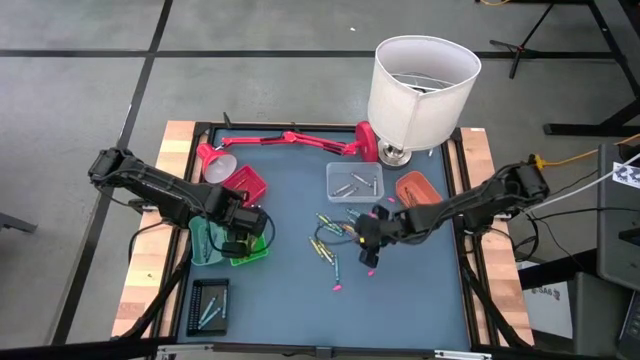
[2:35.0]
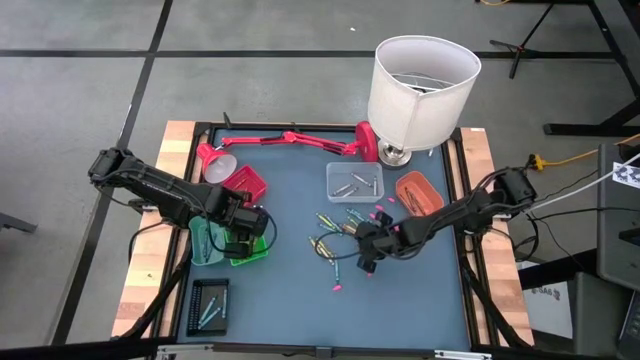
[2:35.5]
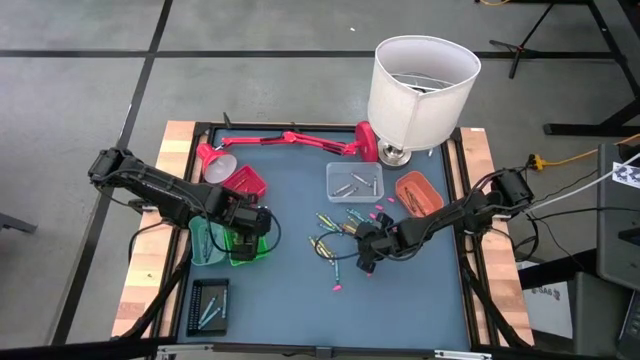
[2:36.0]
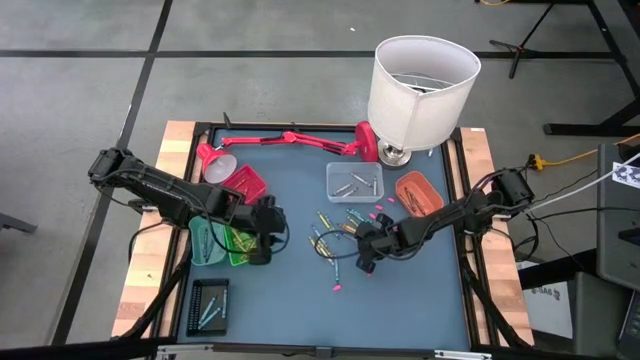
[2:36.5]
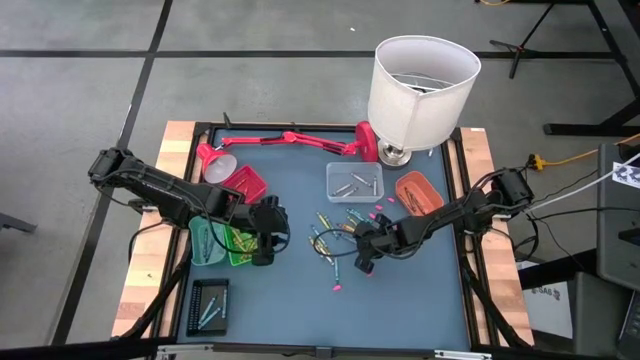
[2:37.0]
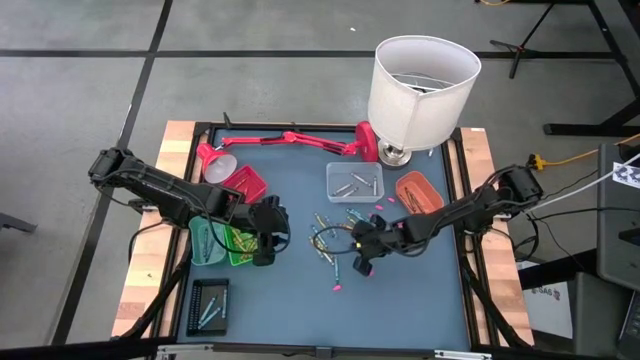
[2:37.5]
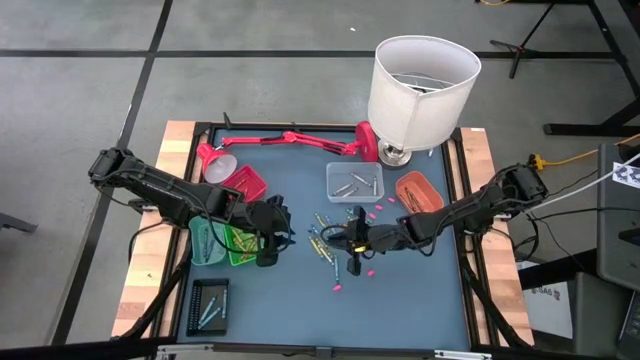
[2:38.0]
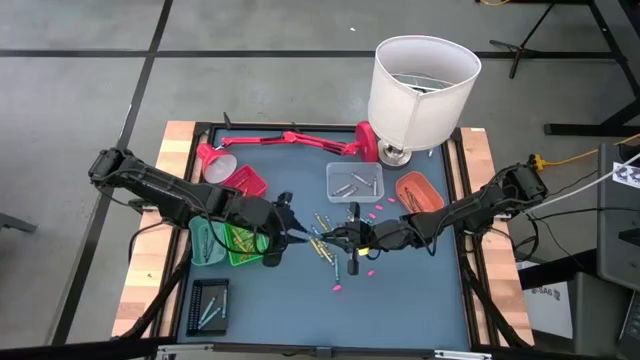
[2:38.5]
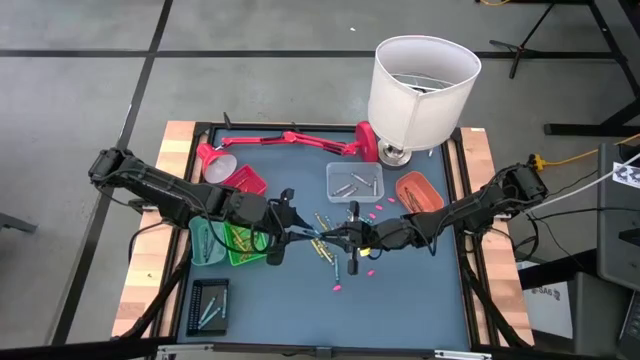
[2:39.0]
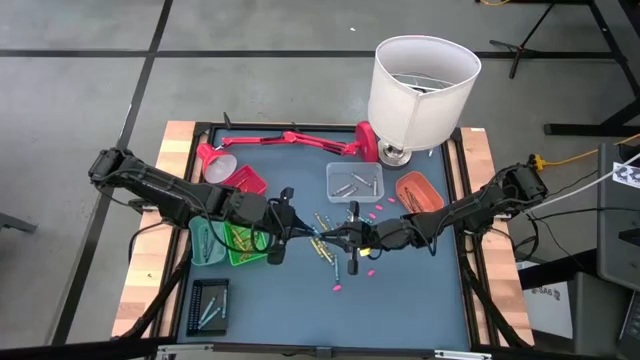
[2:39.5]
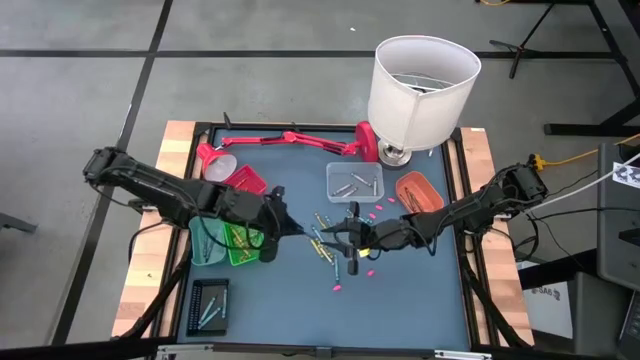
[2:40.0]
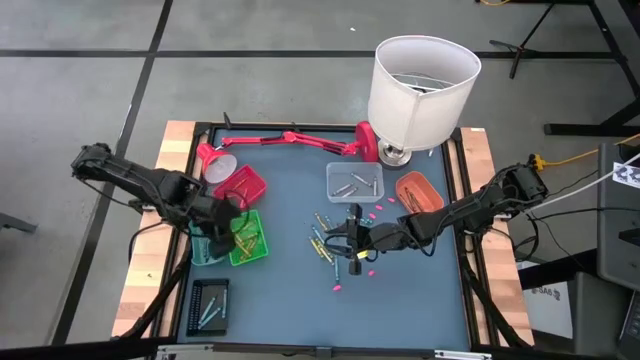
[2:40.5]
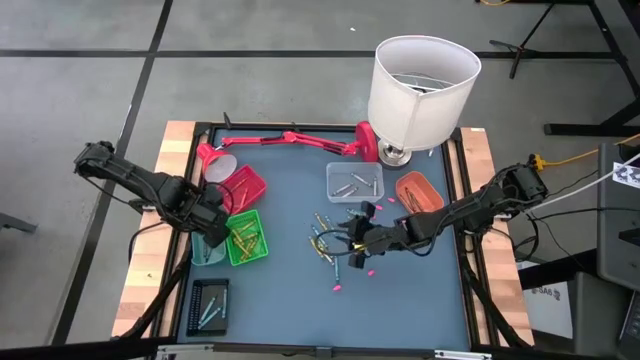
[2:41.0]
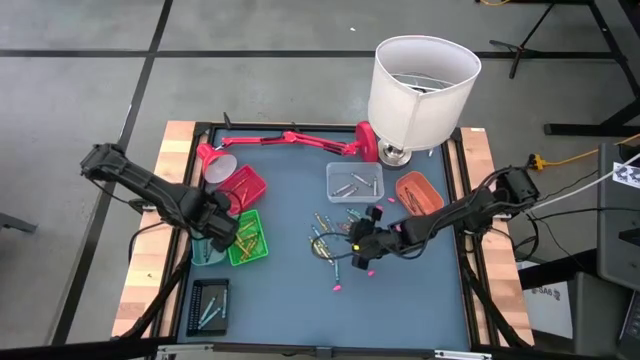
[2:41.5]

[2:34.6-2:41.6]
Task: Sort crayons
Put the blue crayon into the blue bin

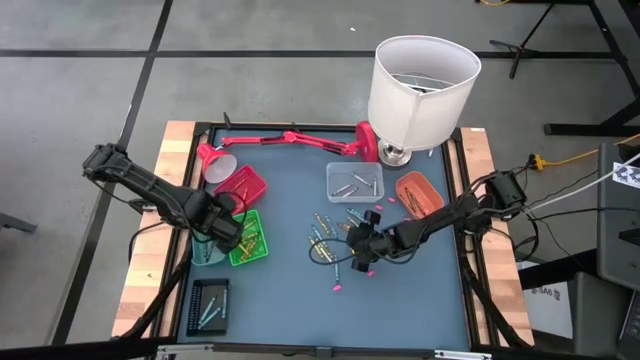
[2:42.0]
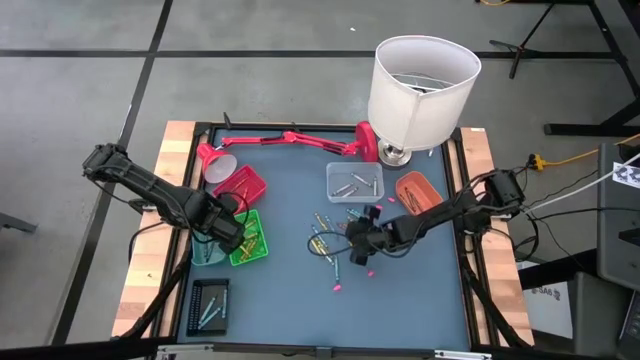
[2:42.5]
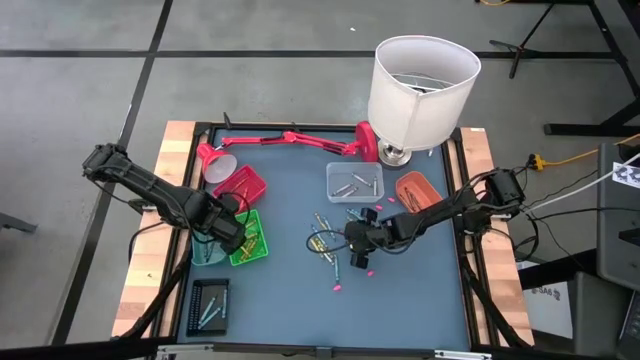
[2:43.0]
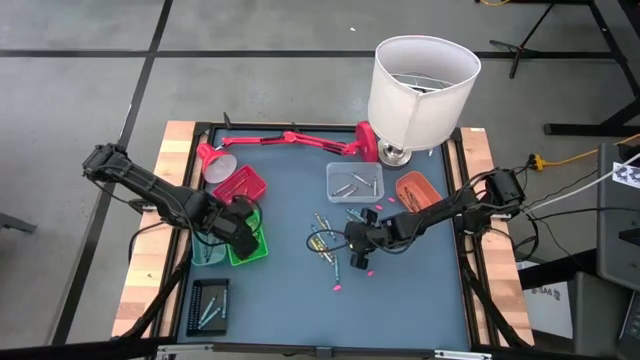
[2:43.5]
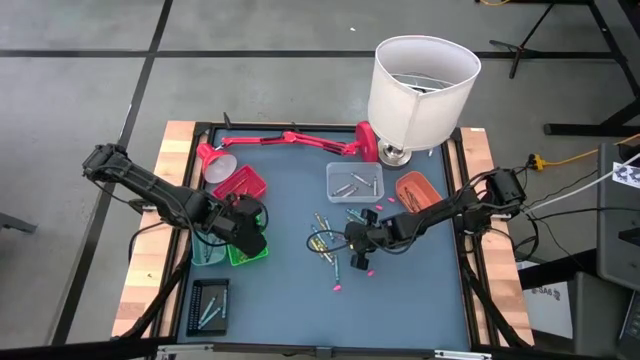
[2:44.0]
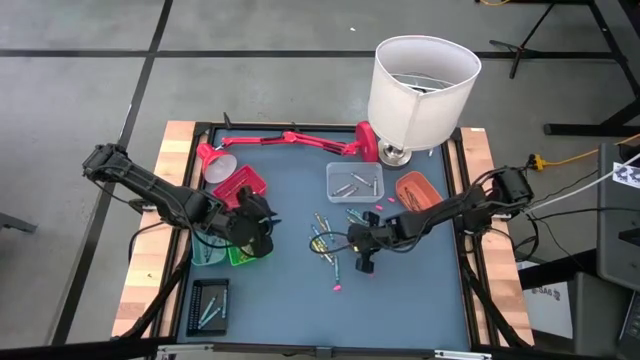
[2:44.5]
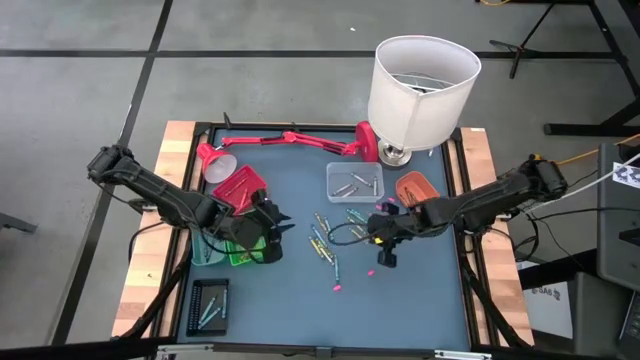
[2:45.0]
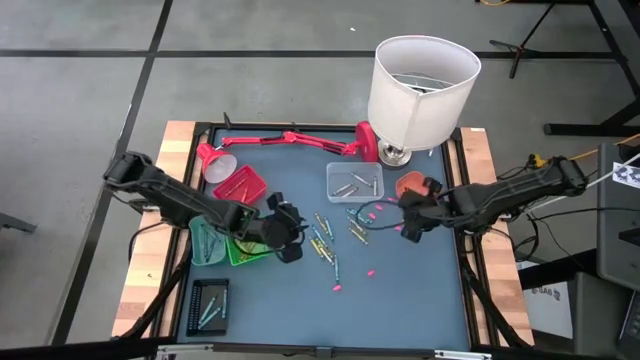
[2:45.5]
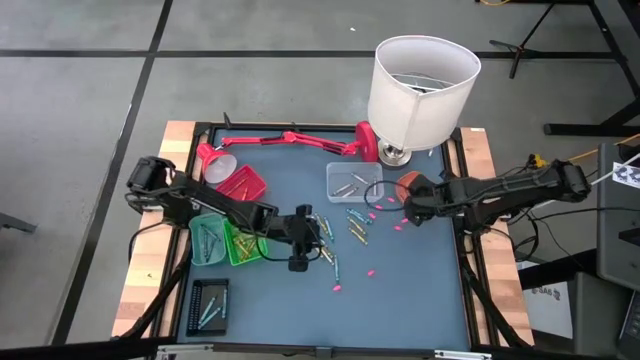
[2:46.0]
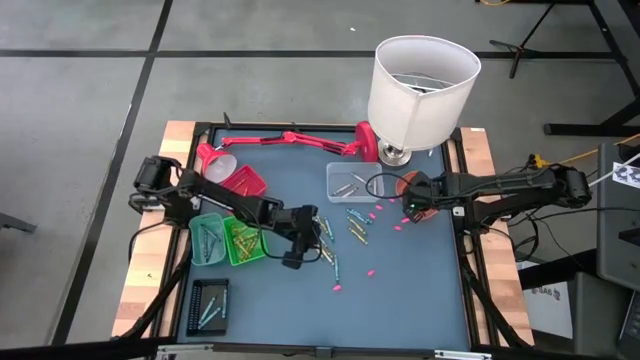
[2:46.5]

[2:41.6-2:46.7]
Put the brown crayon into the orange bin

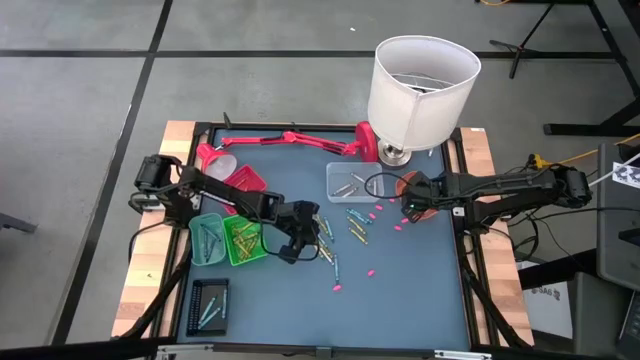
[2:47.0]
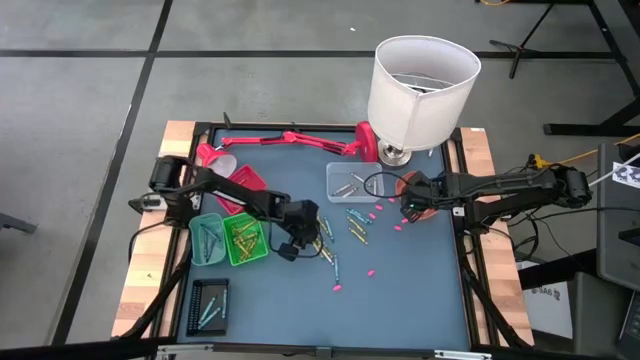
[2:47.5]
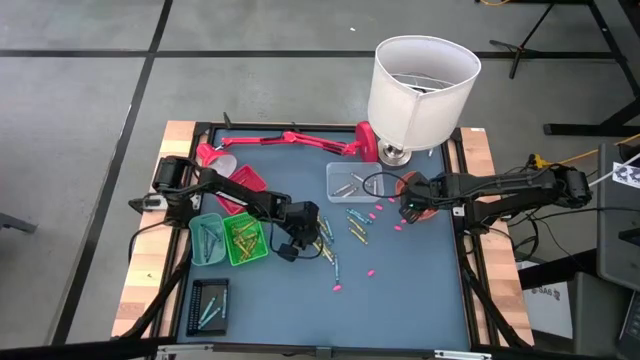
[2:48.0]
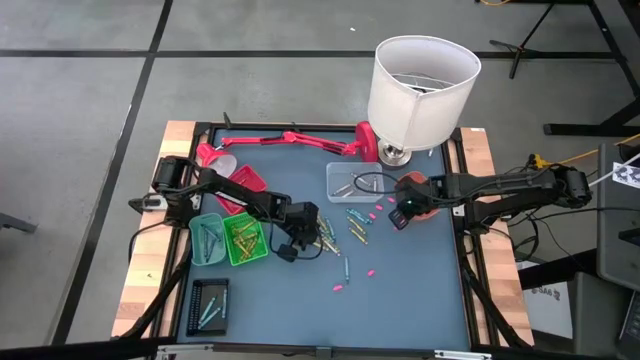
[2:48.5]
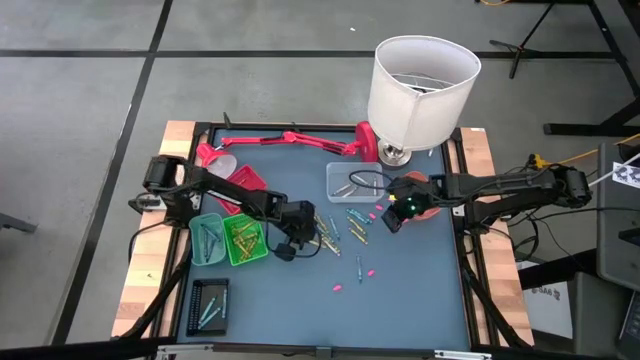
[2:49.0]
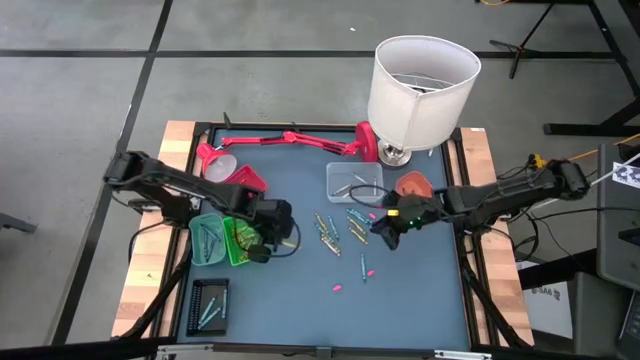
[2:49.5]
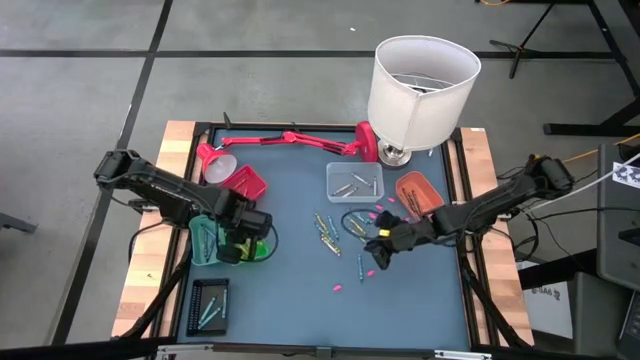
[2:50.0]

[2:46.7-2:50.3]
Put the green crayon into the green bin

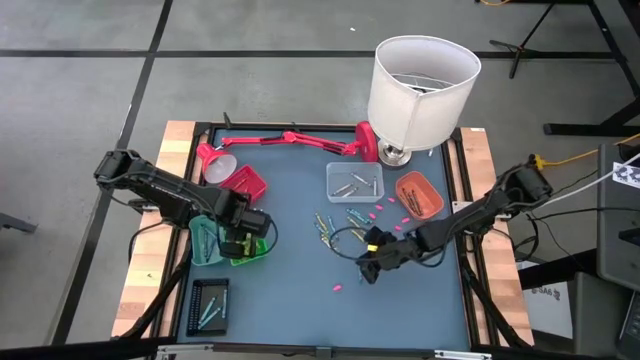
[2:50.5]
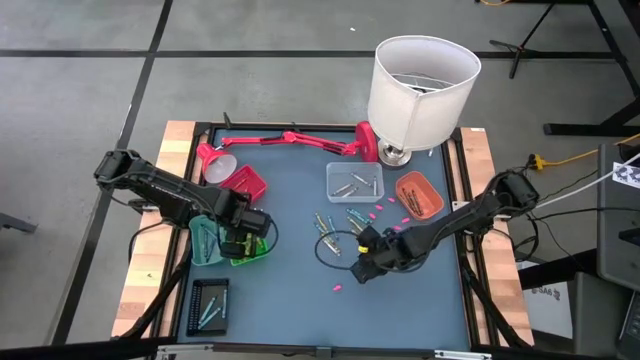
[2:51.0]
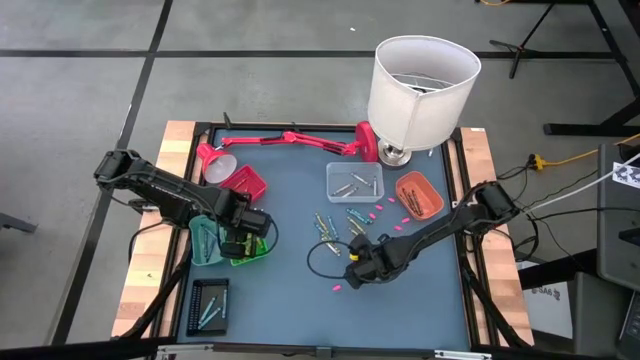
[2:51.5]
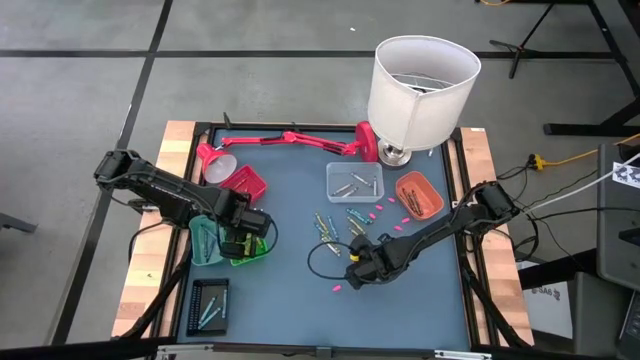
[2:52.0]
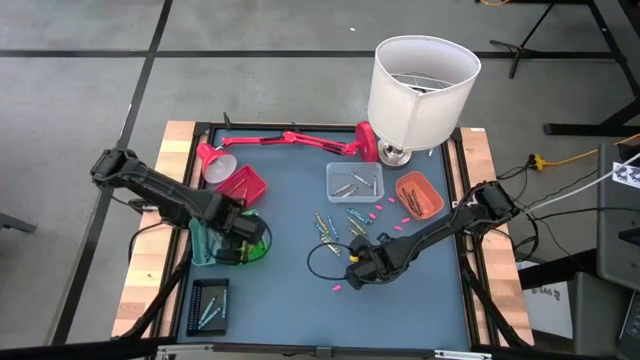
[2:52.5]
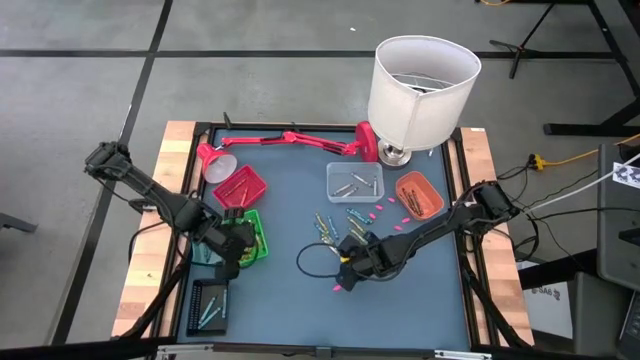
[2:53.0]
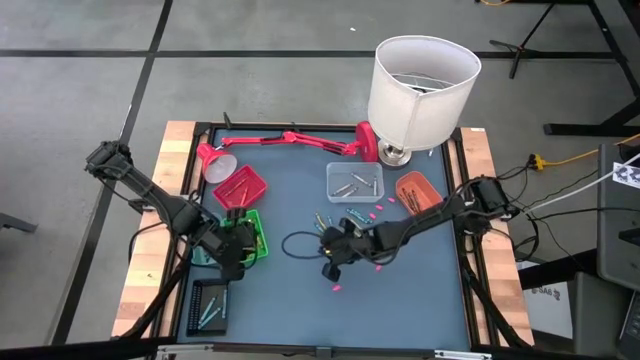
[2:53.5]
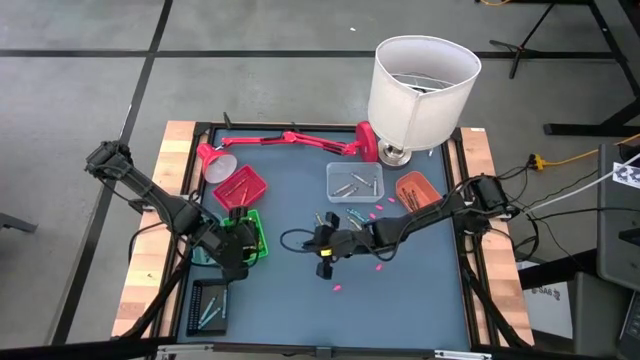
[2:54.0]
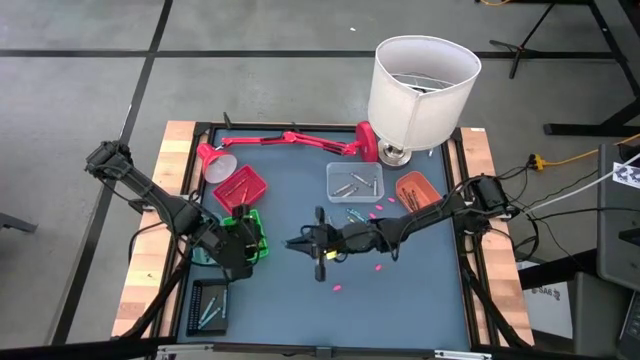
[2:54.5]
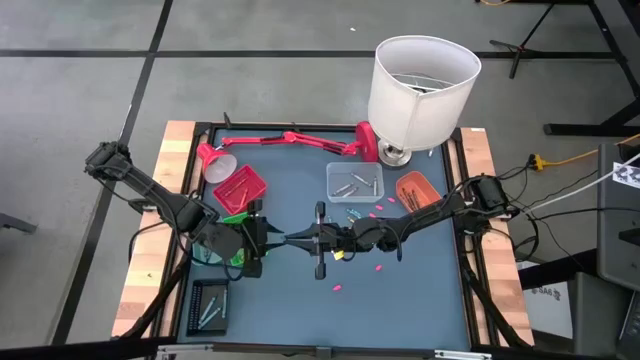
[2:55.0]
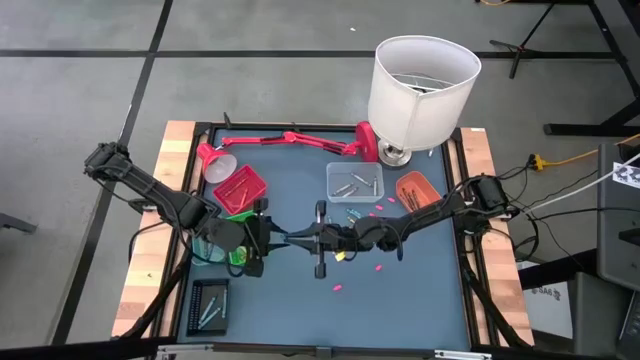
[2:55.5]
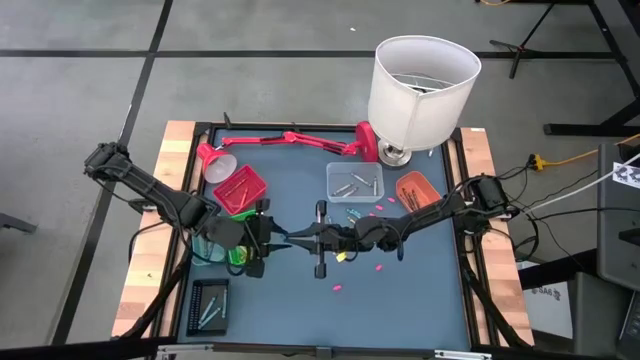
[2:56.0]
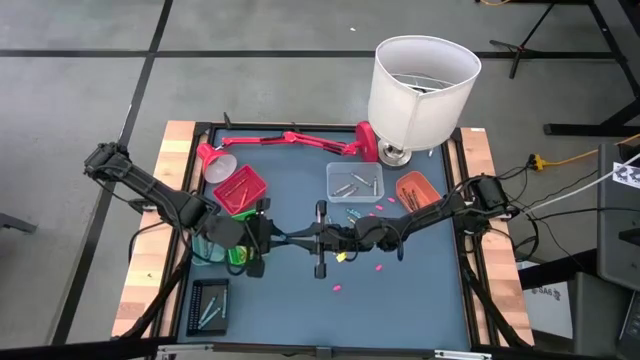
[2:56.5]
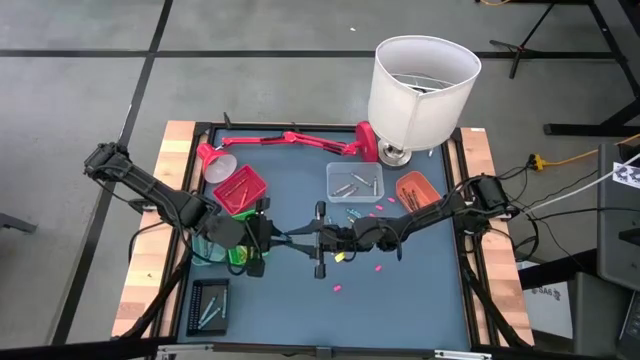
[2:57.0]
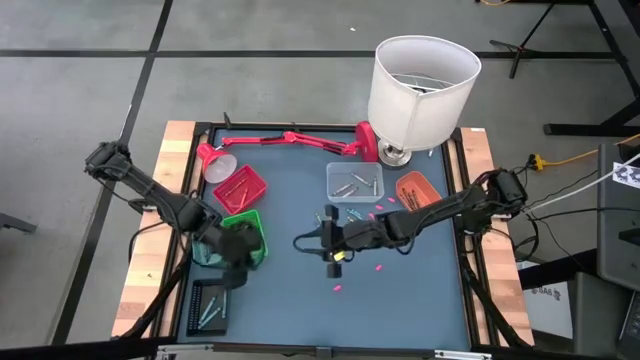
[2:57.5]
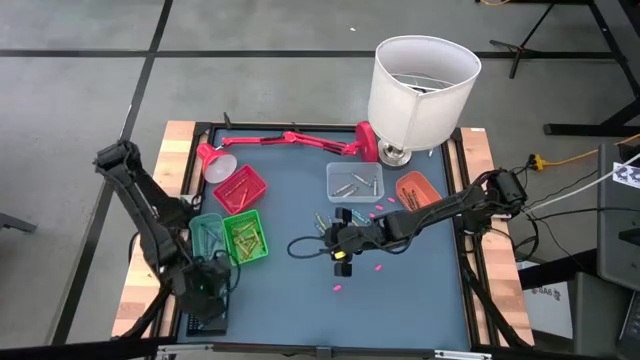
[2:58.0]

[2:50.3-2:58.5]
Put the dark green crayon into the black bin
